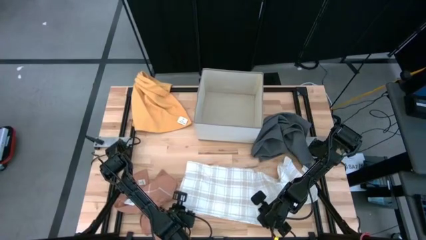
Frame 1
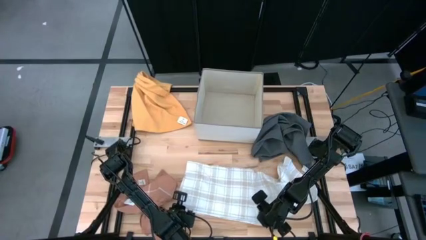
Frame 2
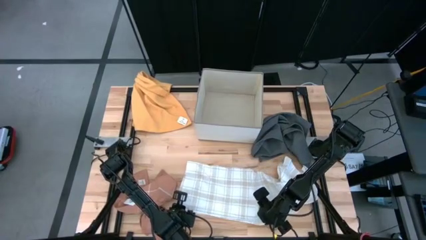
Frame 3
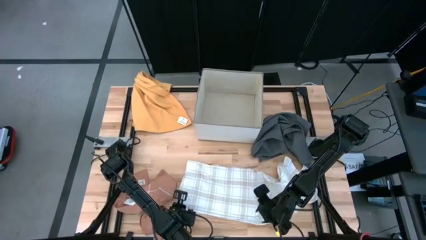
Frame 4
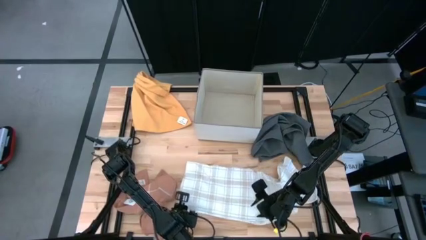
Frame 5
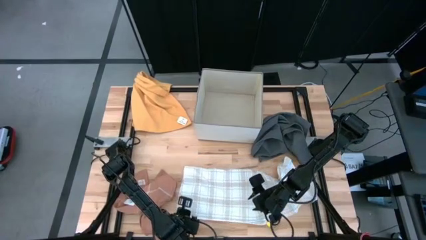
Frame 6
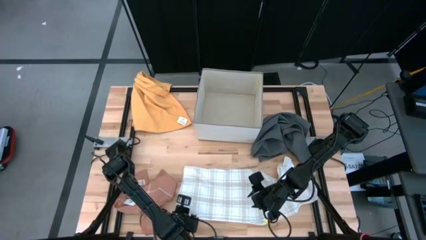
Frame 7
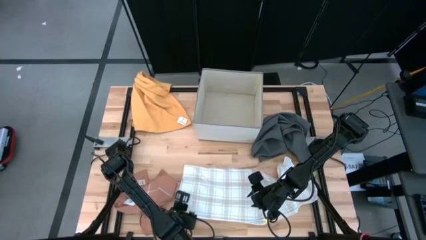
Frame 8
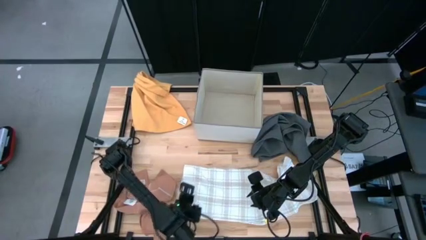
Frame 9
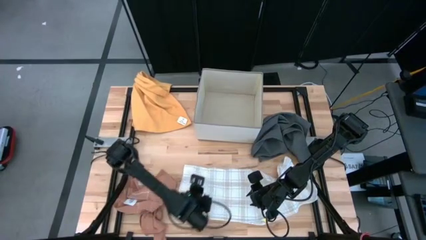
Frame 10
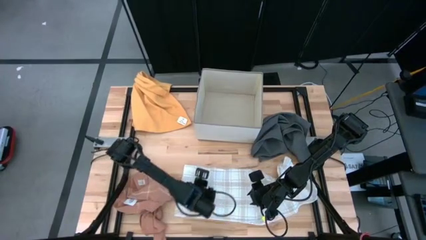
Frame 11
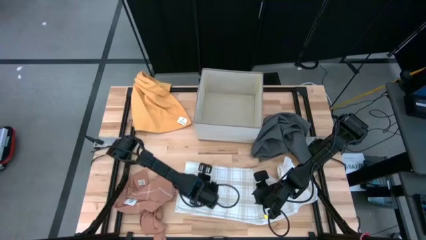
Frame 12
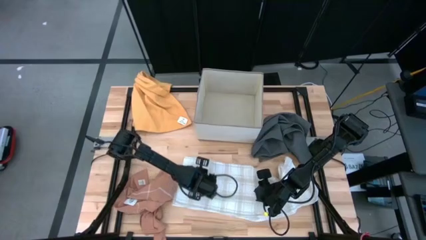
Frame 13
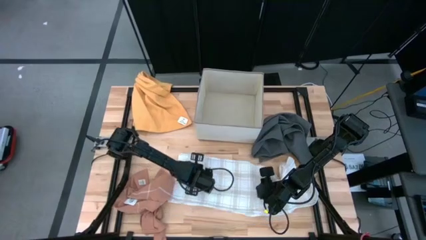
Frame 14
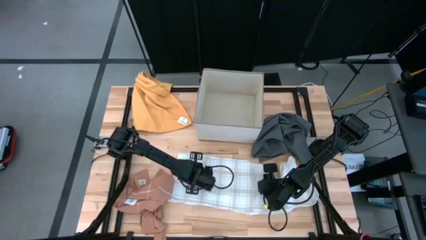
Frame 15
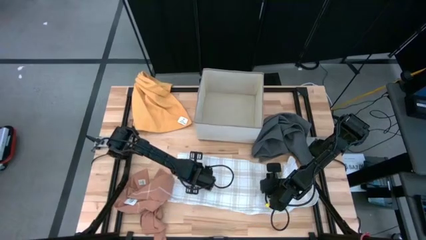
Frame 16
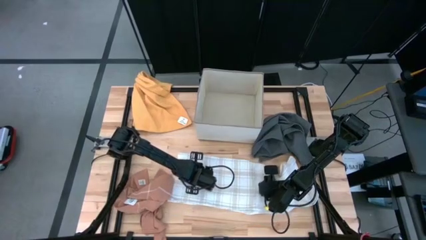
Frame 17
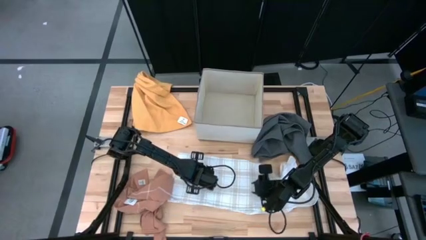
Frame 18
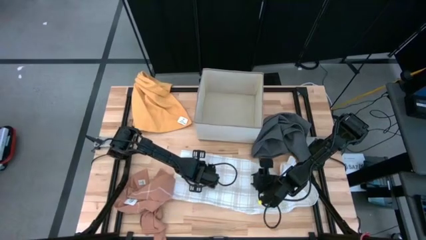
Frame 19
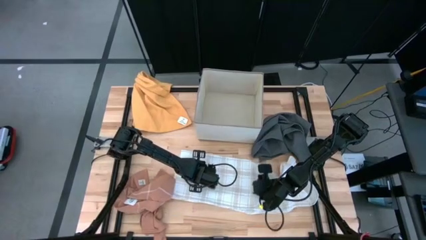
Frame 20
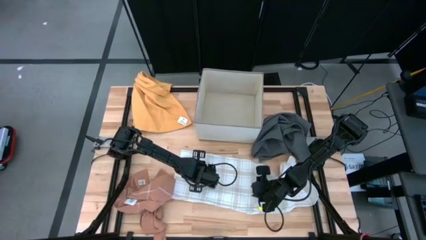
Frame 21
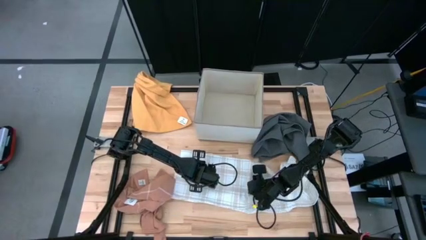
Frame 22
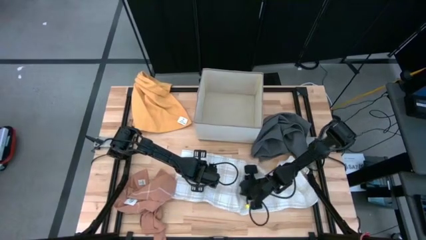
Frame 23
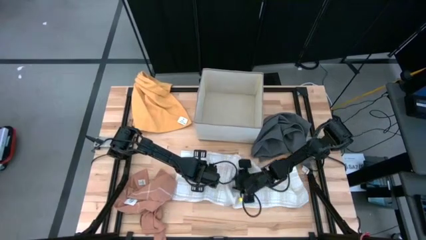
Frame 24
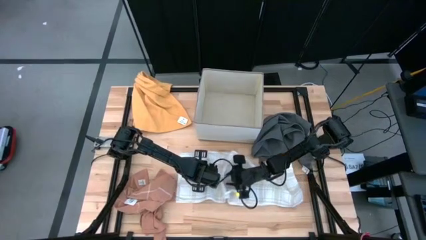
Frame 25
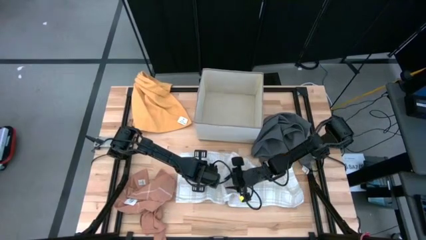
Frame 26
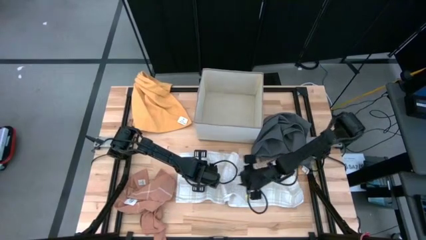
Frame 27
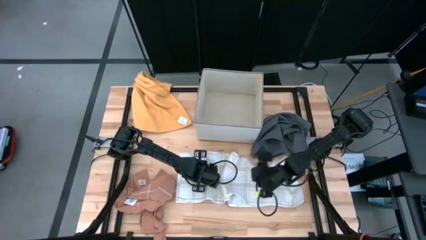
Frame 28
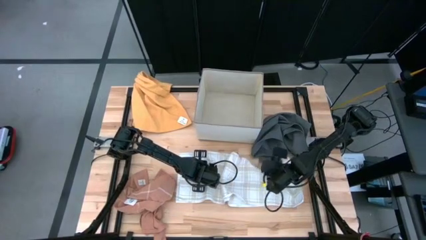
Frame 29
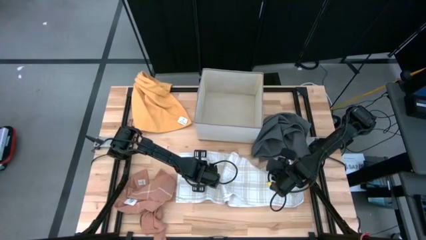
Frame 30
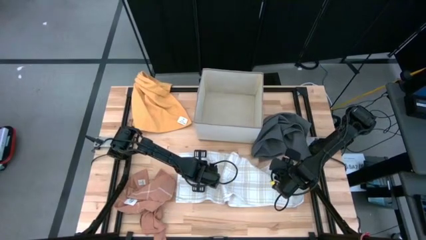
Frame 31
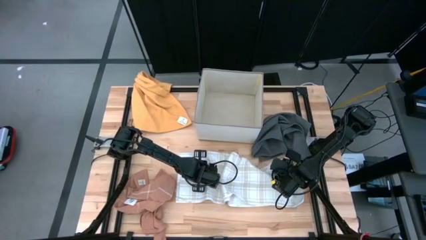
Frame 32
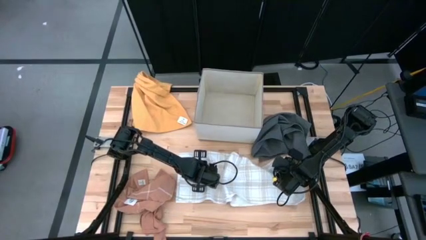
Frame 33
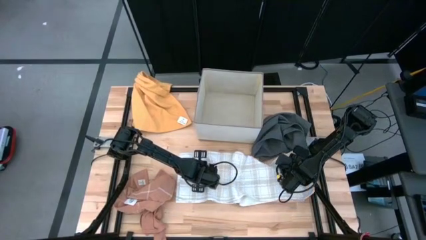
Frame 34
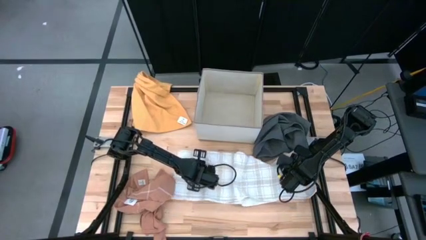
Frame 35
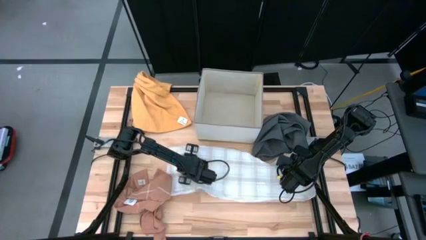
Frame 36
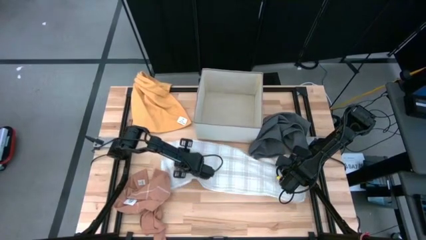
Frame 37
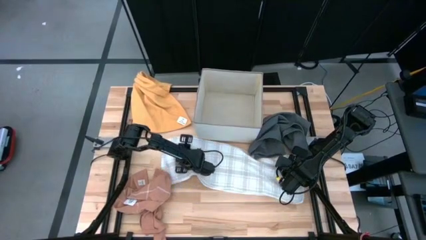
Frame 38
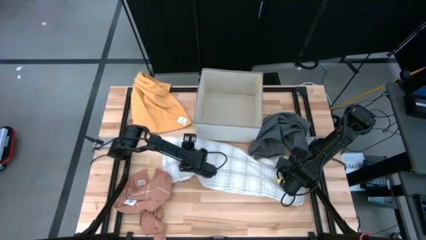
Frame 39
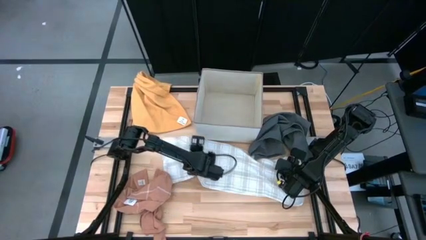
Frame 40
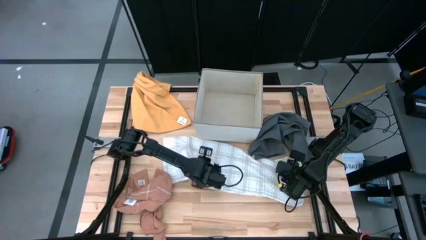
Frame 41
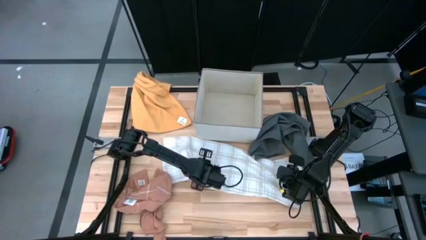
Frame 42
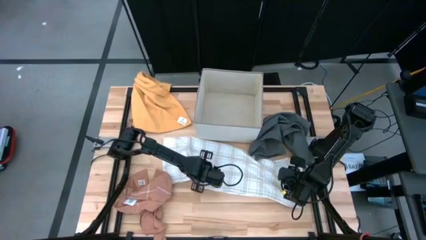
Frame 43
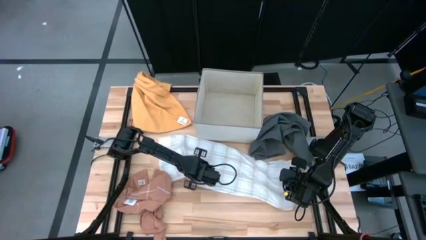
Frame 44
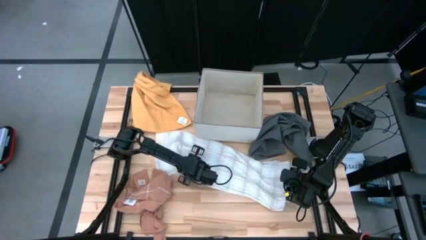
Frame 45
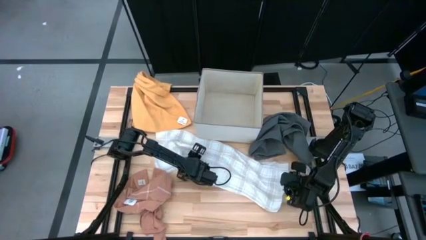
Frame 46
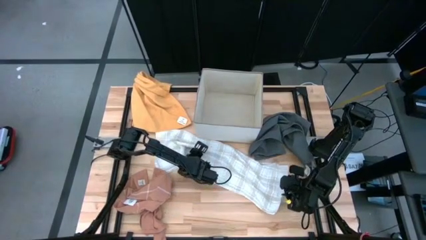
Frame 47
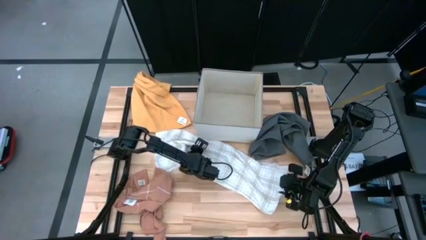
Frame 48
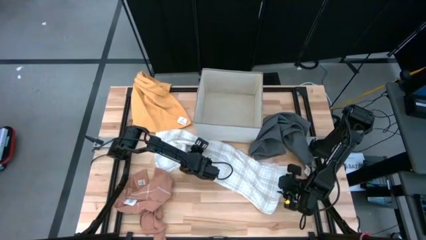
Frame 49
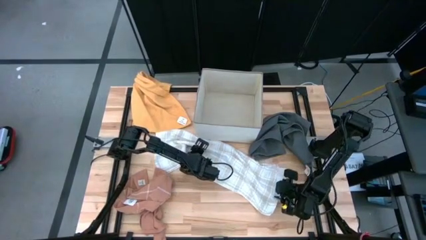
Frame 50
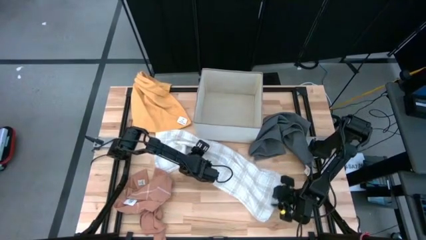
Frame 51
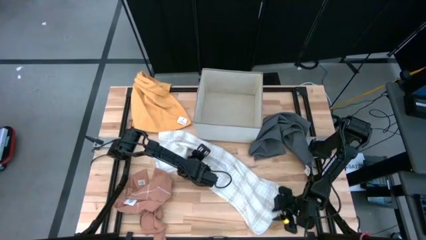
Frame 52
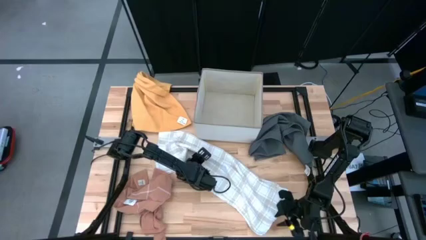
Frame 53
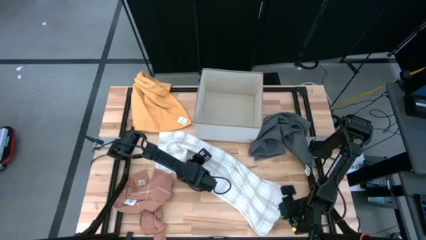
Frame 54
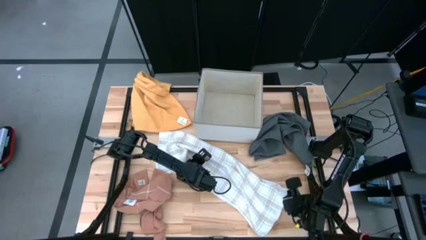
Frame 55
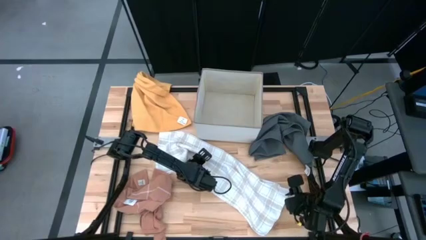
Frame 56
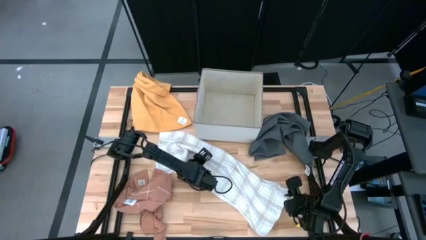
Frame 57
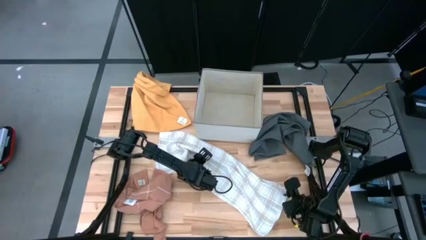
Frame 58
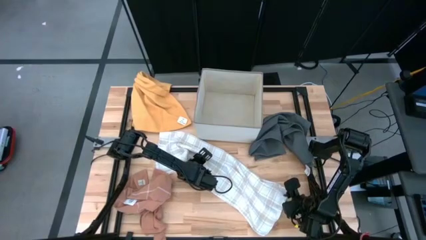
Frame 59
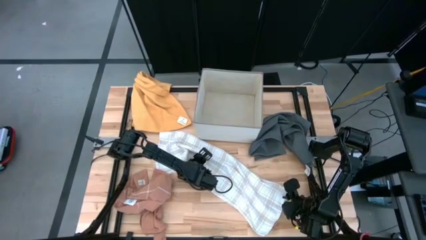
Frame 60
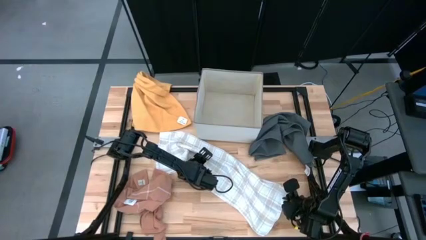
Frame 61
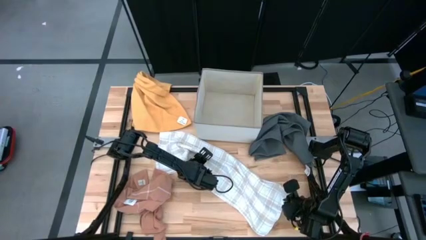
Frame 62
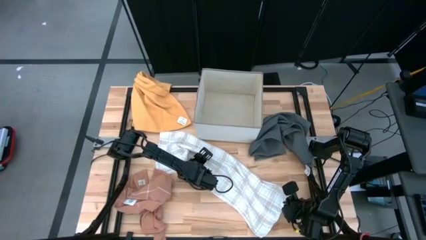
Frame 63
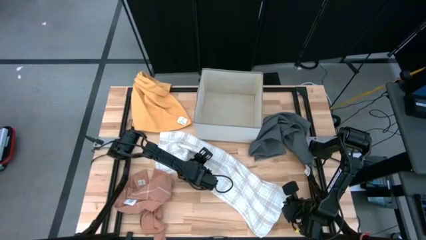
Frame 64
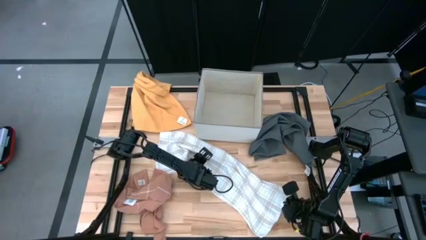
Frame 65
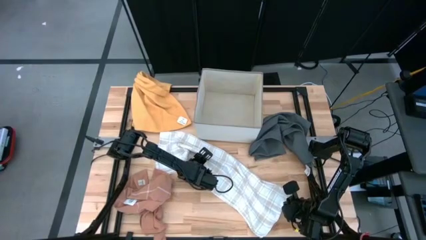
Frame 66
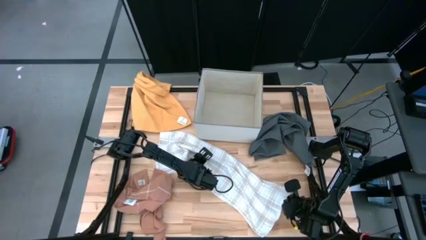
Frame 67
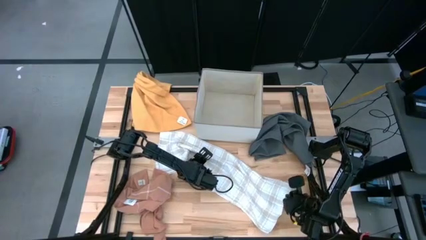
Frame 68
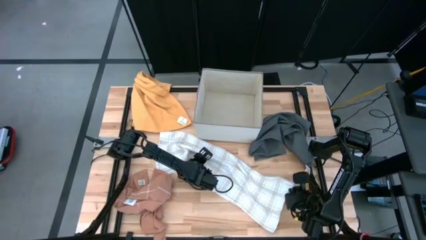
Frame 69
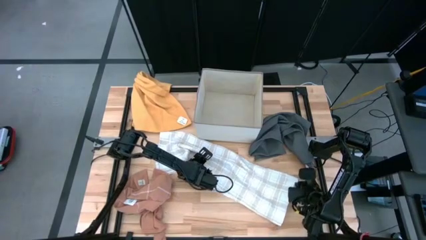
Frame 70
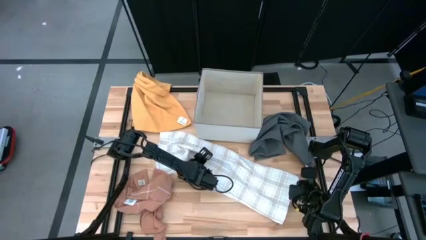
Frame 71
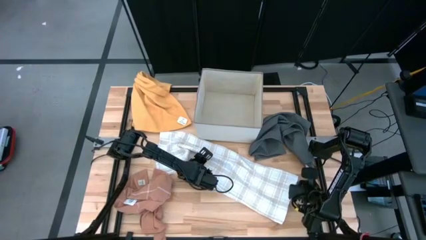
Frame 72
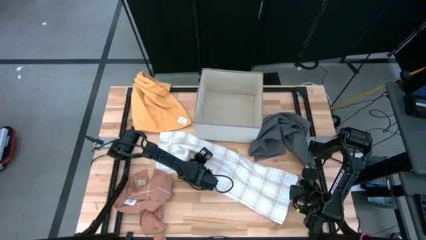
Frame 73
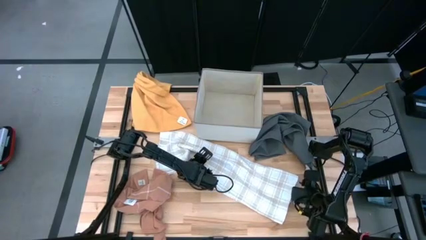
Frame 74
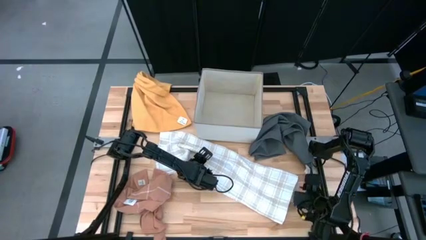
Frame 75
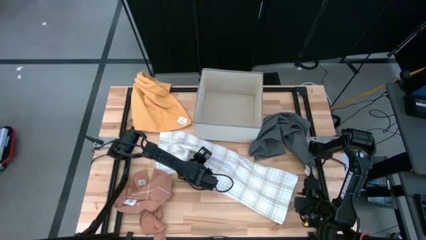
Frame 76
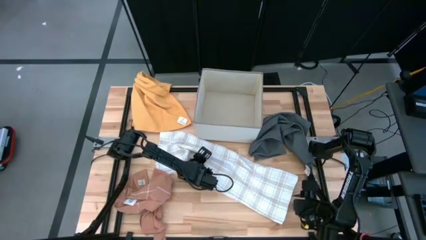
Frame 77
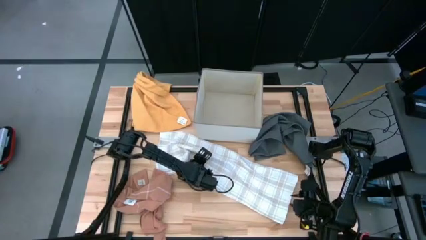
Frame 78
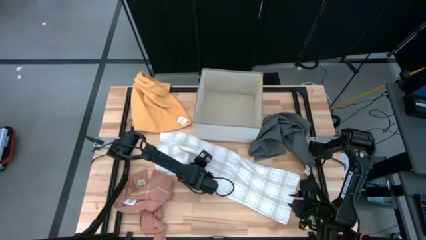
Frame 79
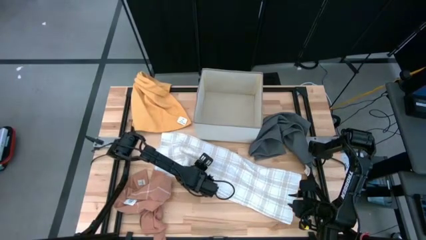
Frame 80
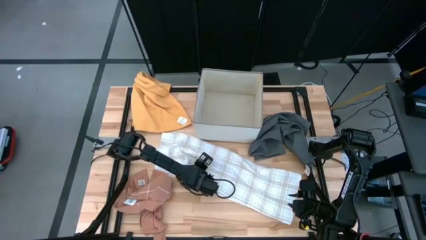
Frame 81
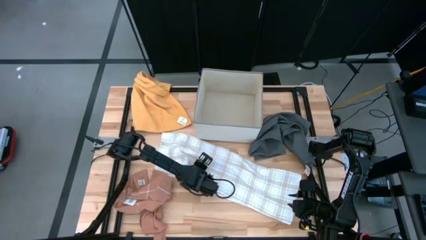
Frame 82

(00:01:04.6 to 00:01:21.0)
Task: Fold towel
Fold the white towel
